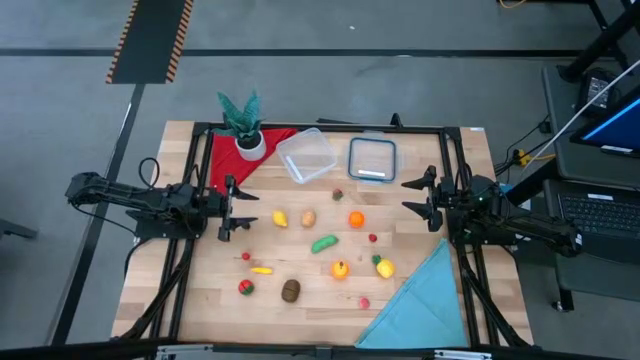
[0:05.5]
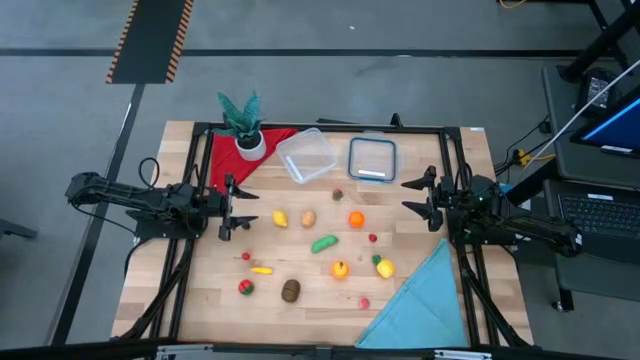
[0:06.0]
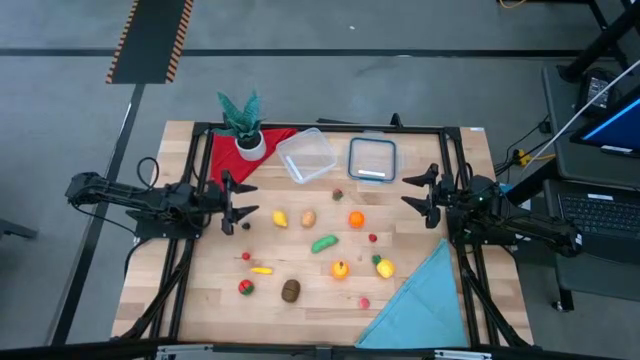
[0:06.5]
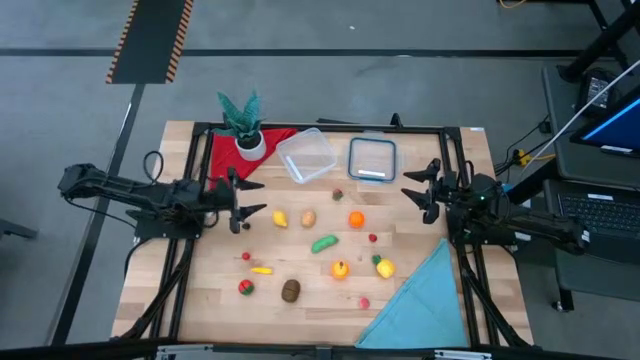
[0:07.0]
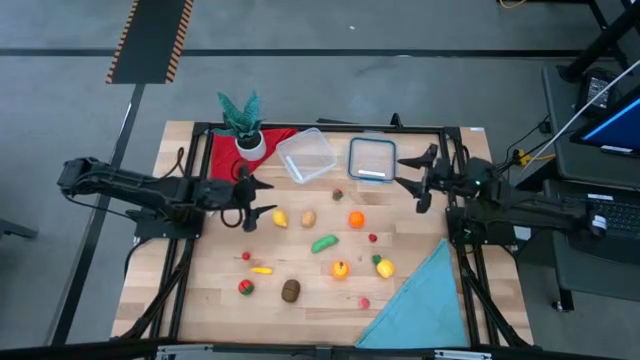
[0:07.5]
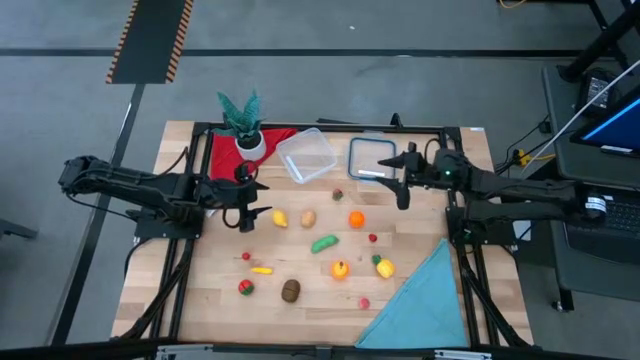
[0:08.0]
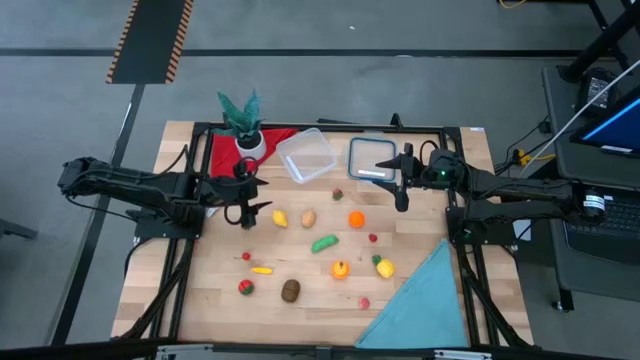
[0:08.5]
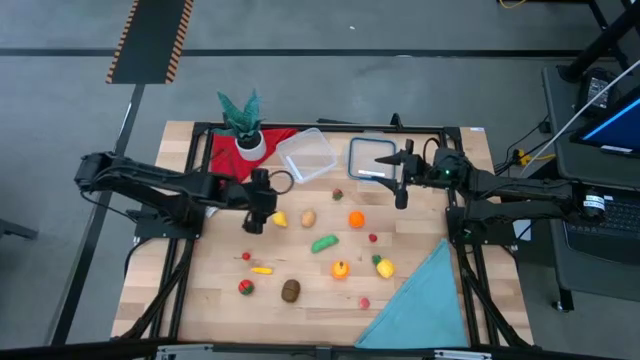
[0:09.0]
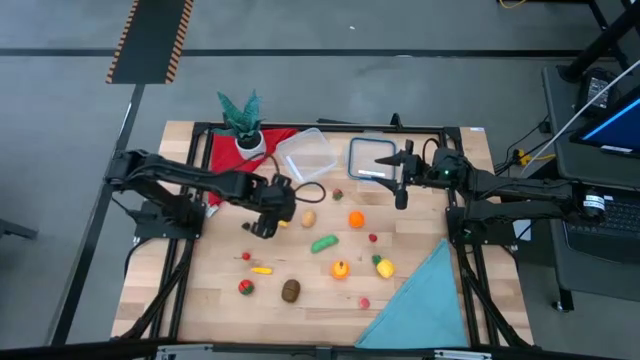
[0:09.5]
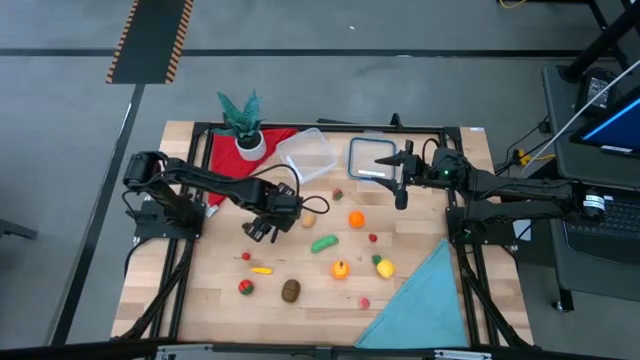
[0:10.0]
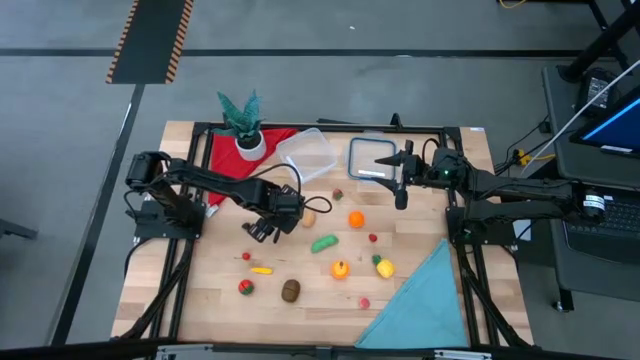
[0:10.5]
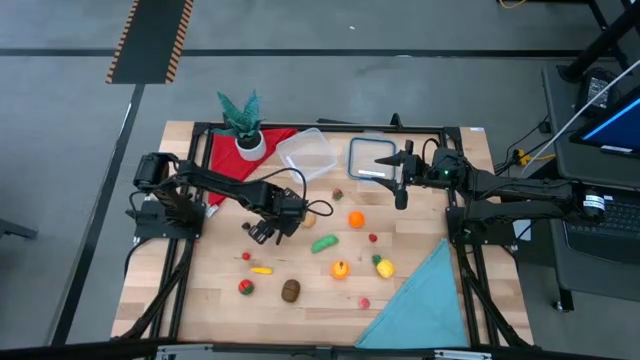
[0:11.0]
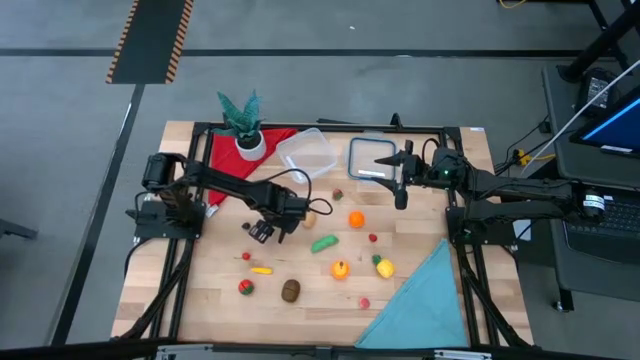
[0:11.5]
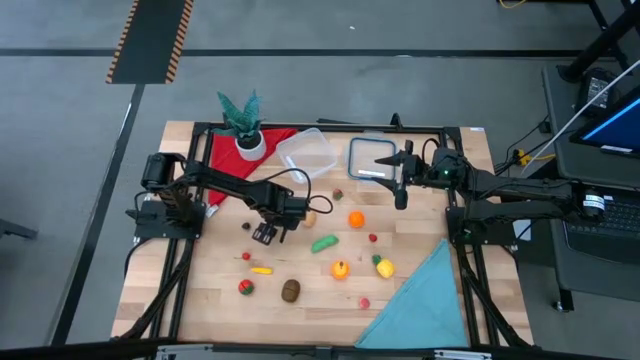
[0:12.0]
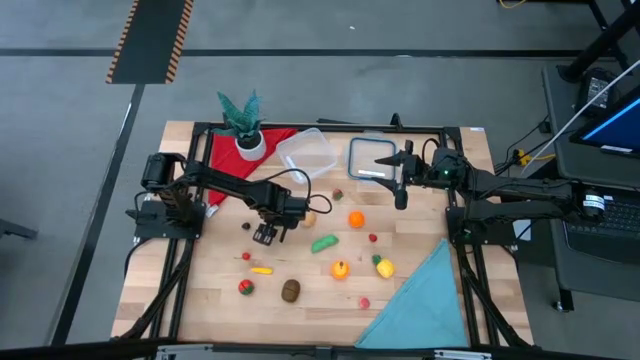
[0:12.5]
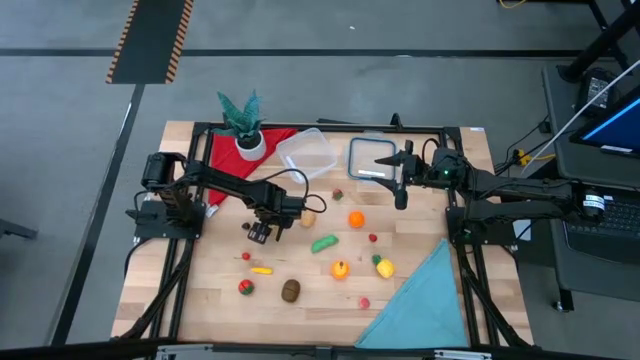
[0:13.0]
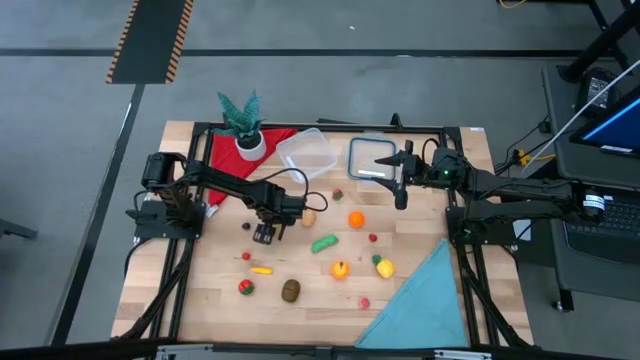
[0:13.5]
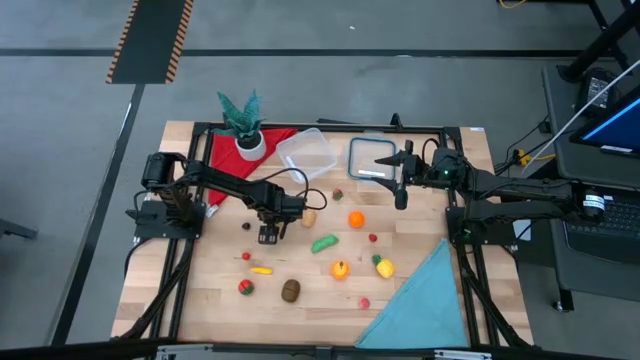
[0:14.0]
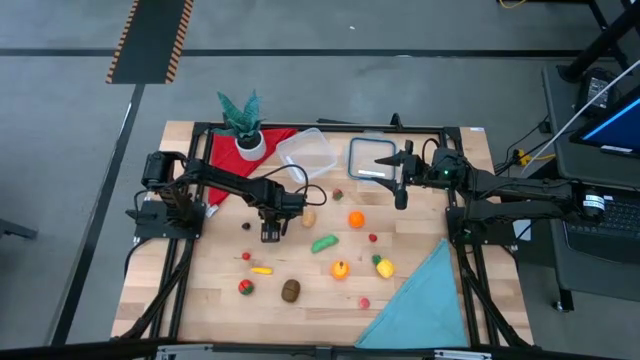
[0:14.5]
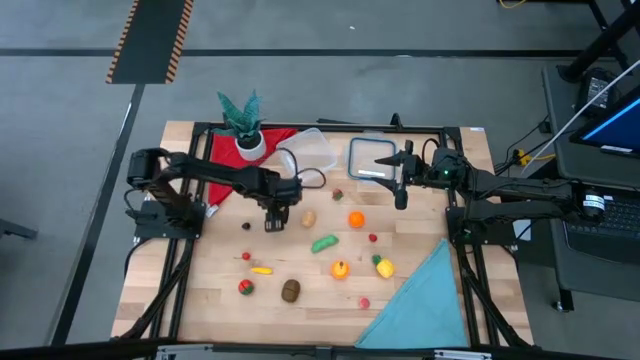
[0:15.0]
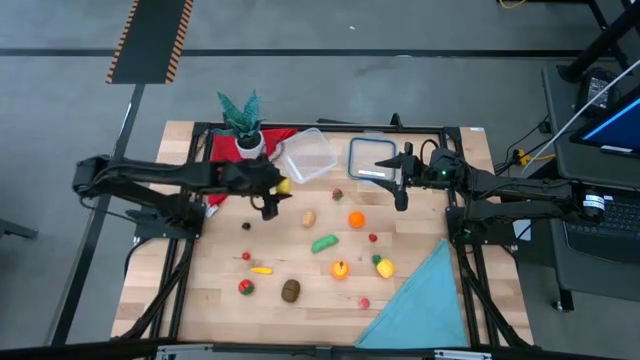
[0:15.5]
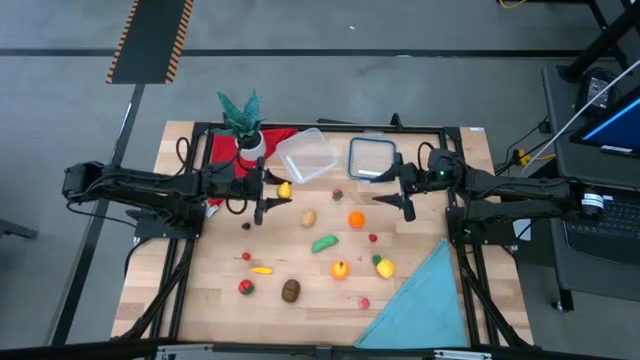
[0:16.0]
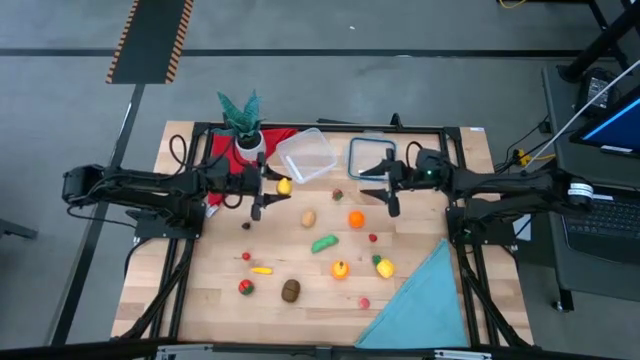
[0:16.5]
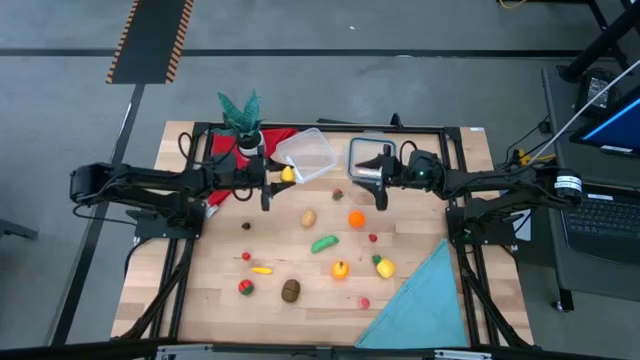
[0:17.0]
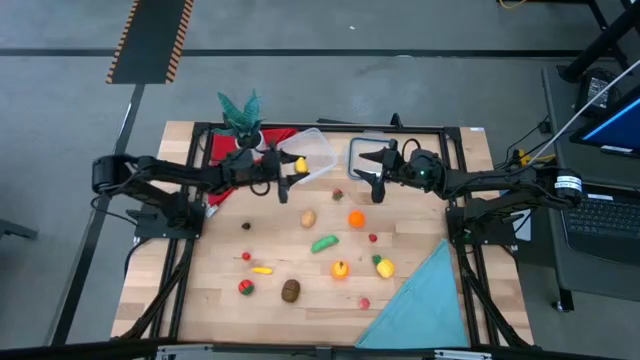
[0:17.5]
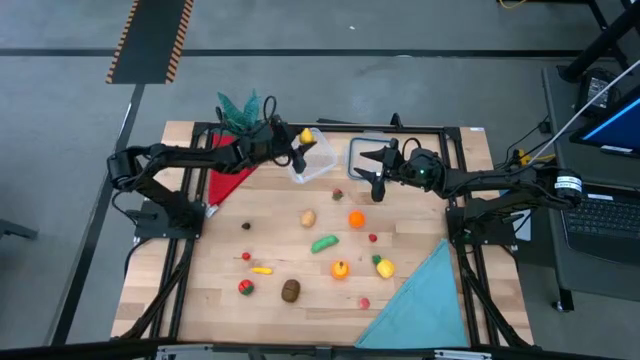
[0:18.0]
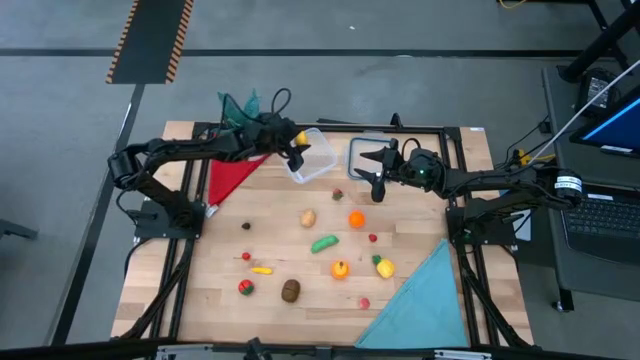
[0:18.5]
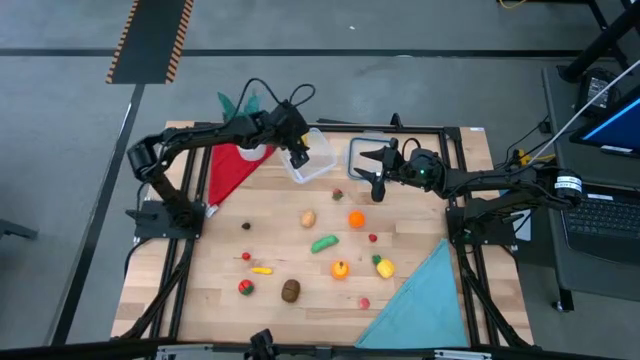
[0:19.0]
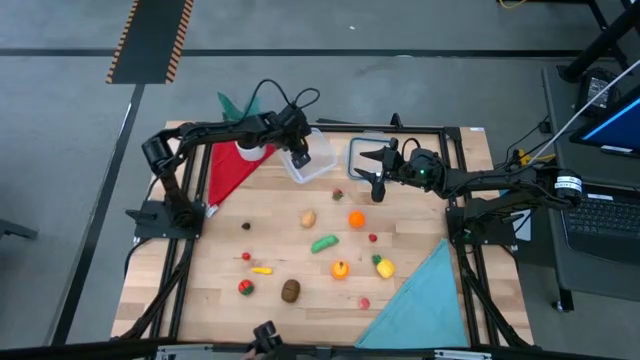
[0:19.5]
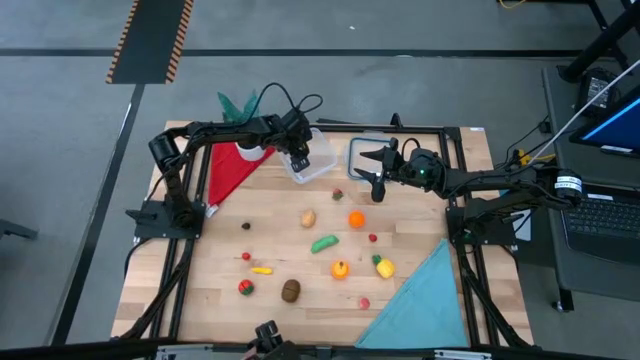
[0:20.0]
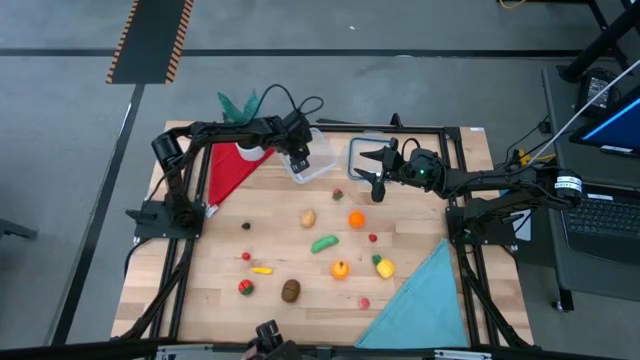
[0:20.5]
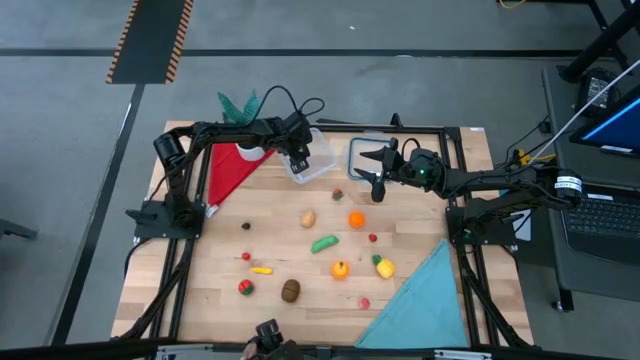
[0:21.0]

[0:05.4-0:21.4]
Task: Pick and placing Produce into tupperware
Put the lemon into the transparent bin

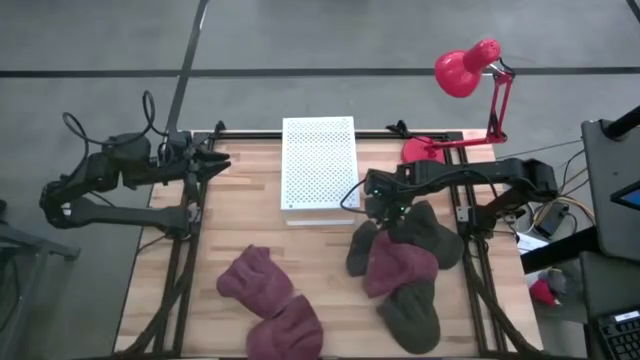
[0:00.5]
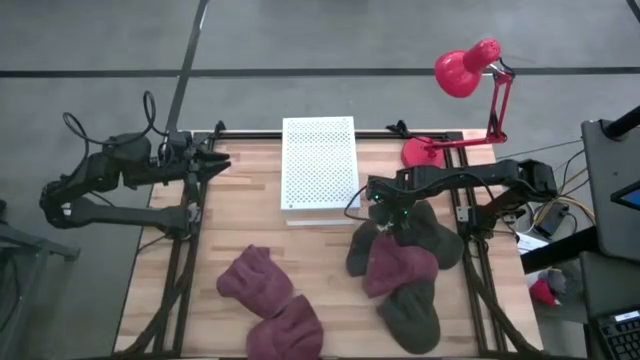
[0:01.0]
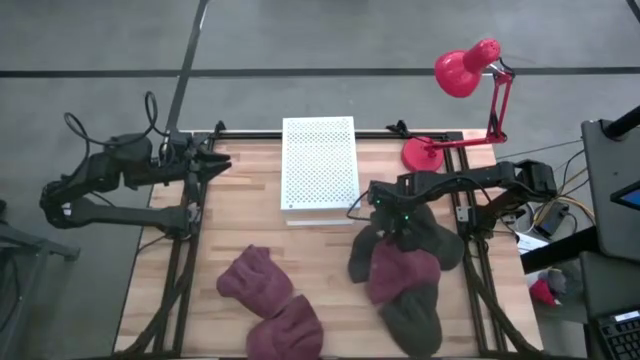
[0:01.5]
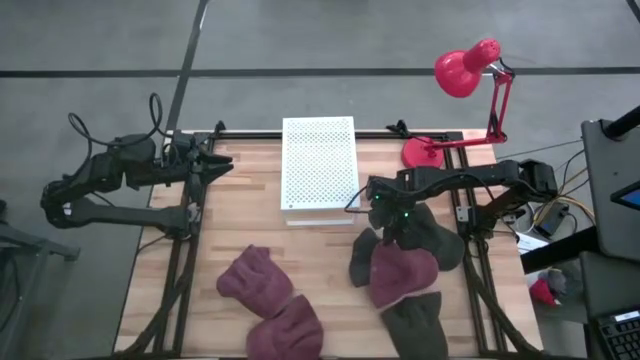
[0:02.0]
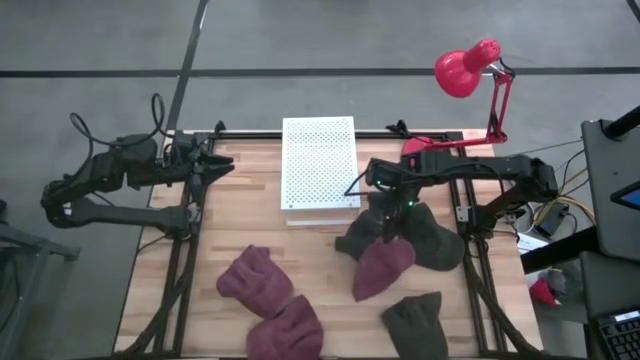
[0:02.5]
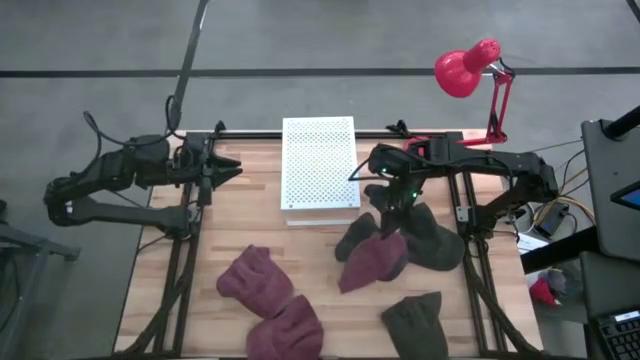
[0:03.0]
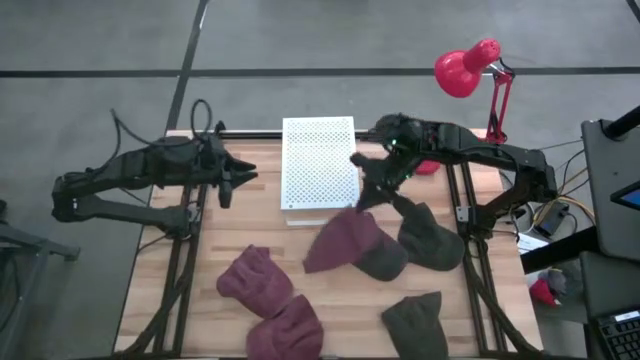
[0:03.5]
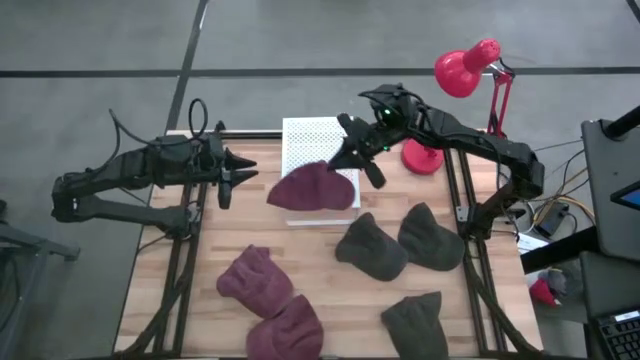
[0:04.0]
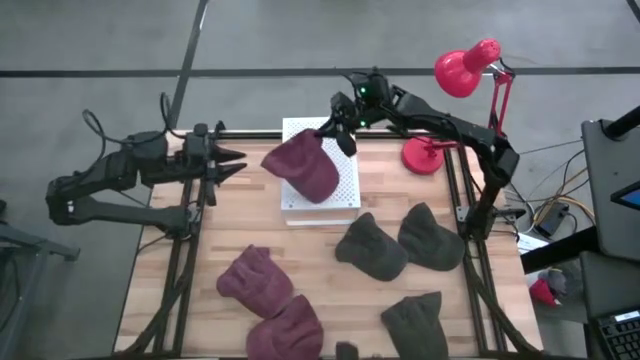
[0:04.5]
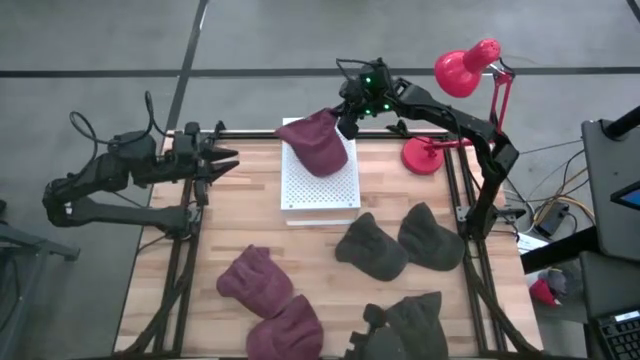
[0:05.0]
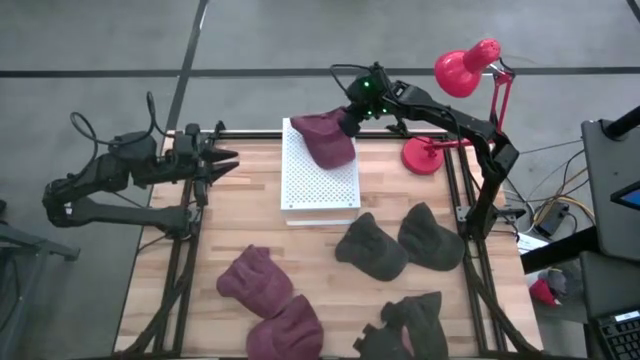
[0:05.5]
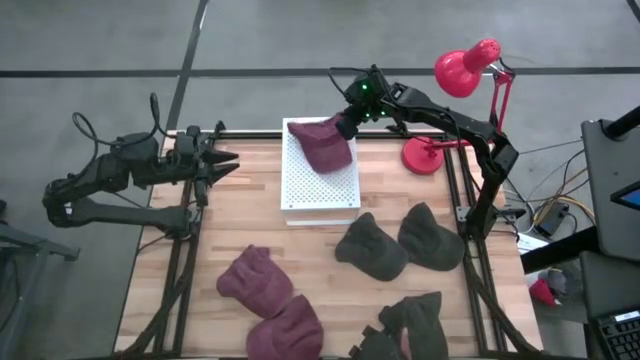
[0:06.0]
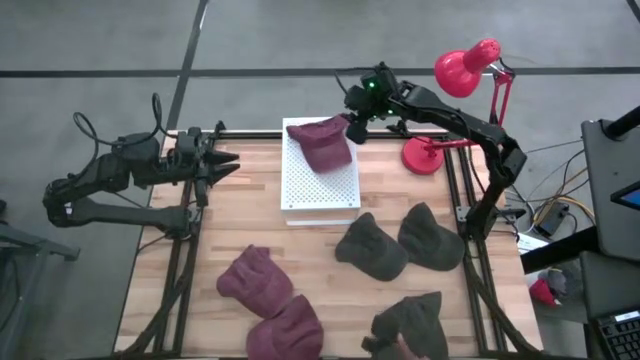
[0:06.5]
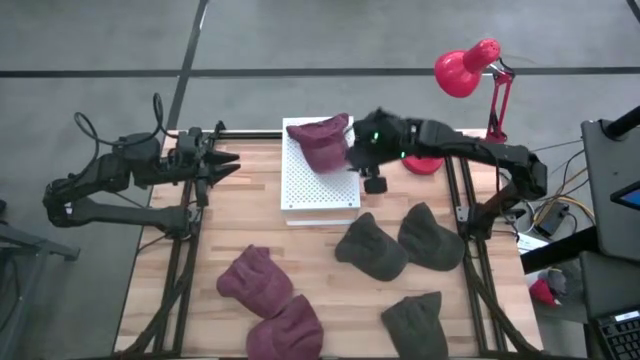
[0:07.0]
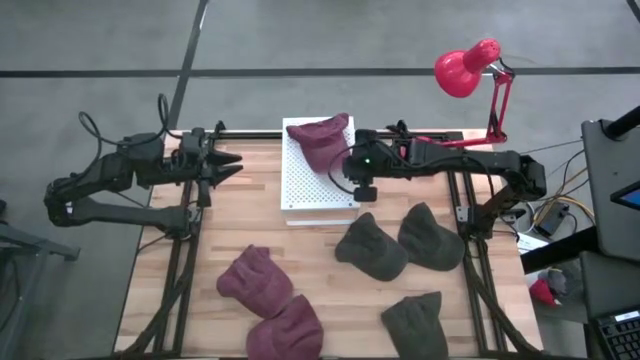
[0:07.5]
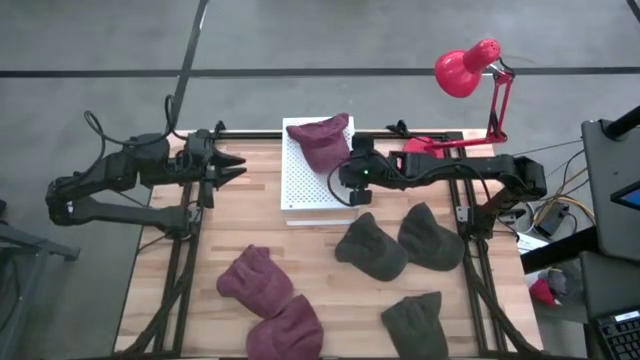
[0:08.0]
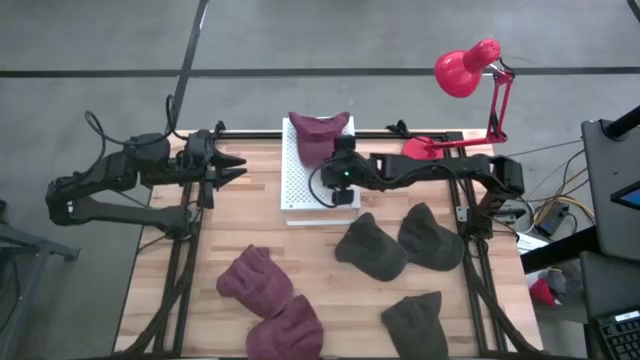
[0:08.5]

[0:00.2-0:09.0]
Task: Pick & Place hat
Put the top right red cap on the shelf
